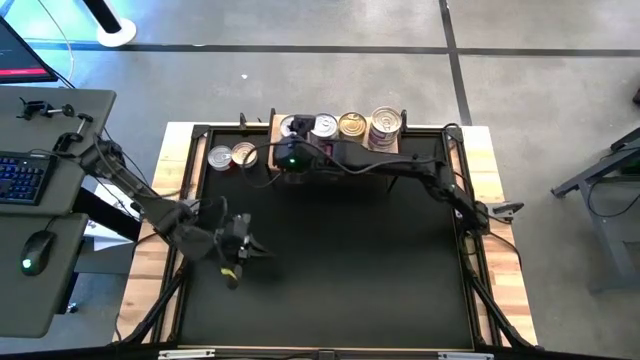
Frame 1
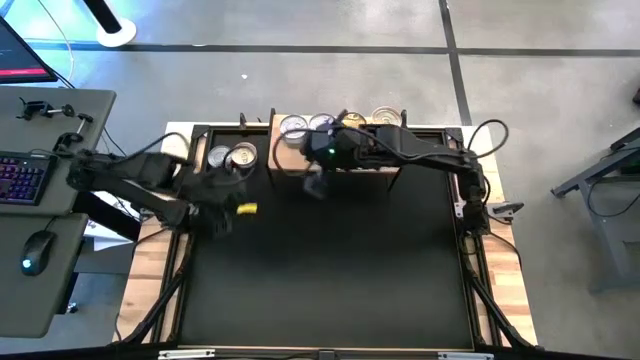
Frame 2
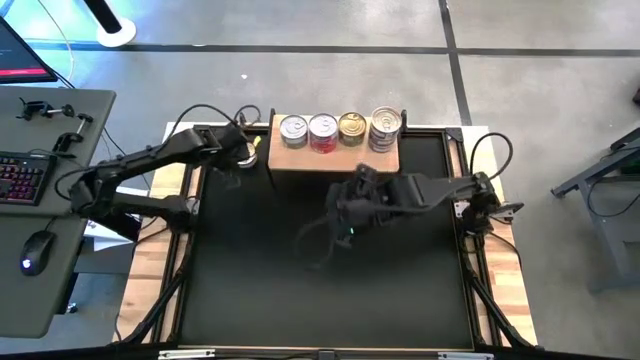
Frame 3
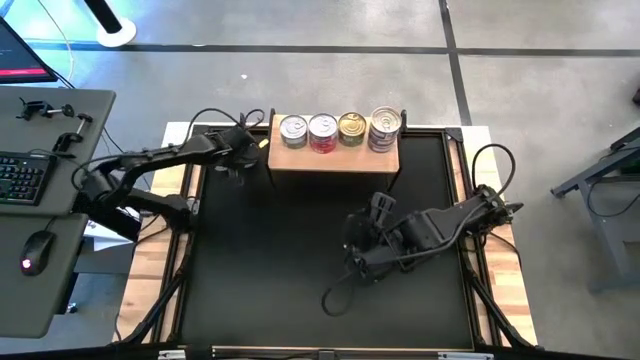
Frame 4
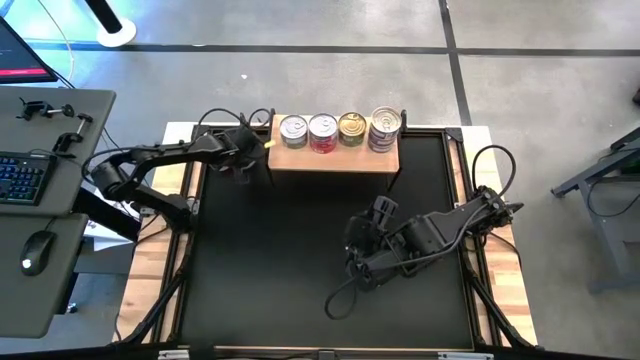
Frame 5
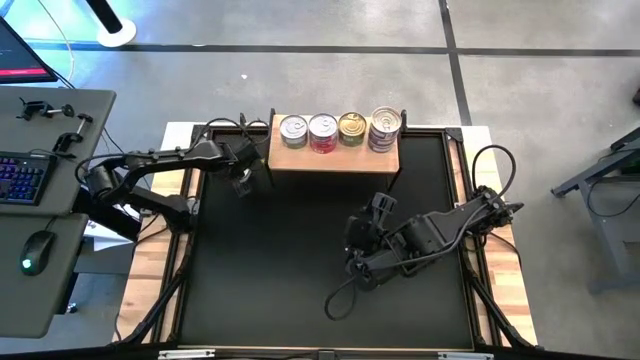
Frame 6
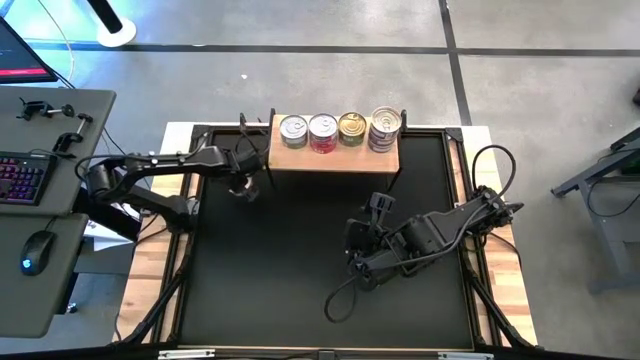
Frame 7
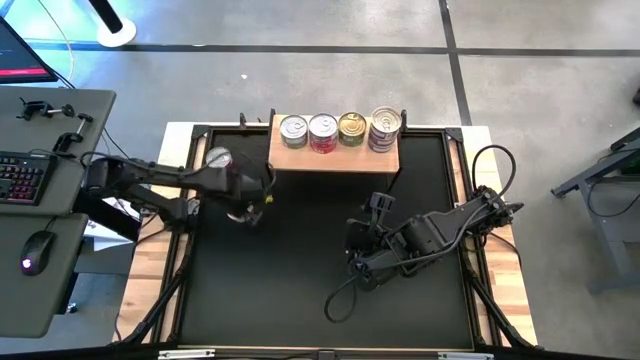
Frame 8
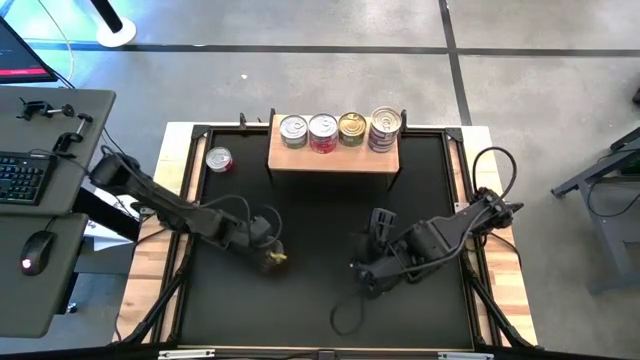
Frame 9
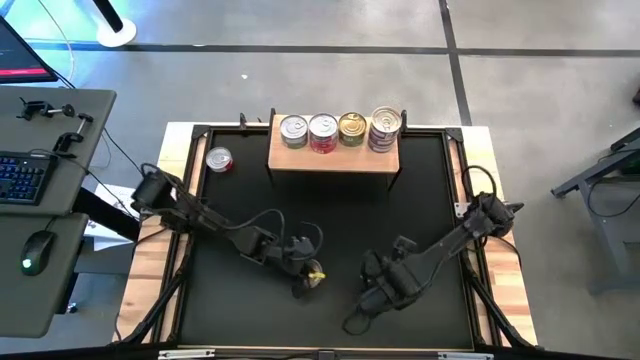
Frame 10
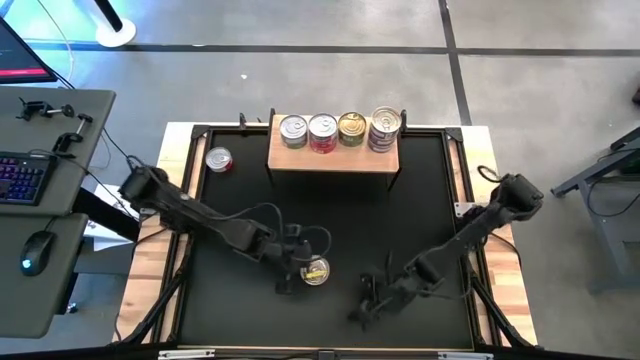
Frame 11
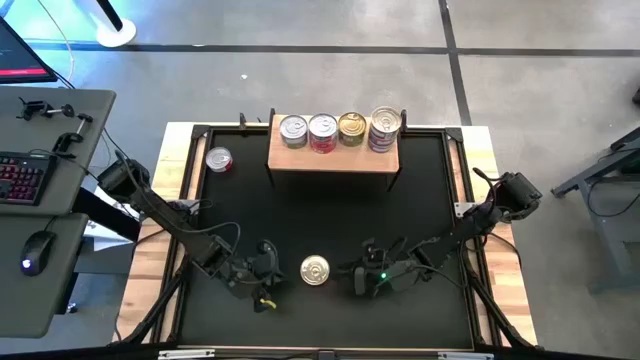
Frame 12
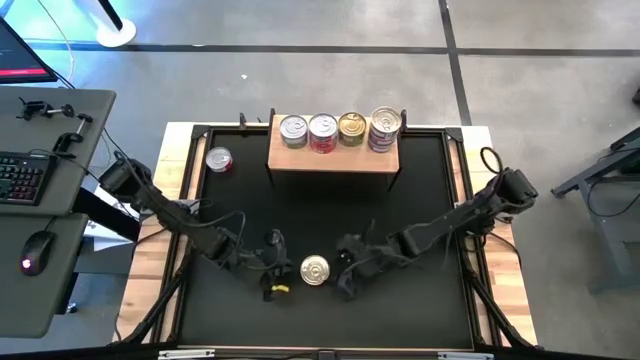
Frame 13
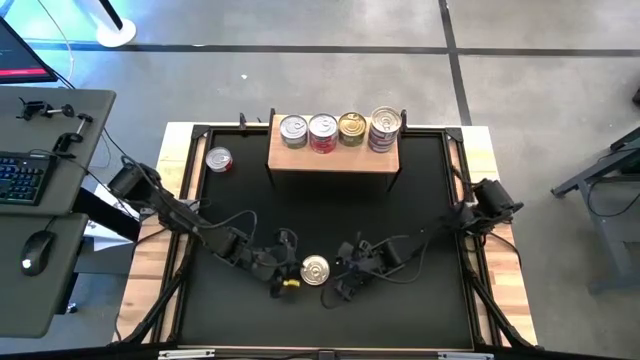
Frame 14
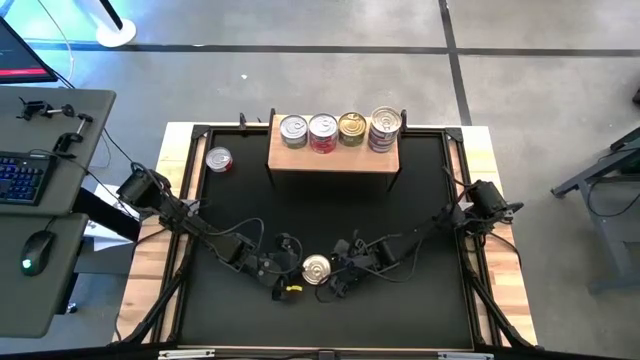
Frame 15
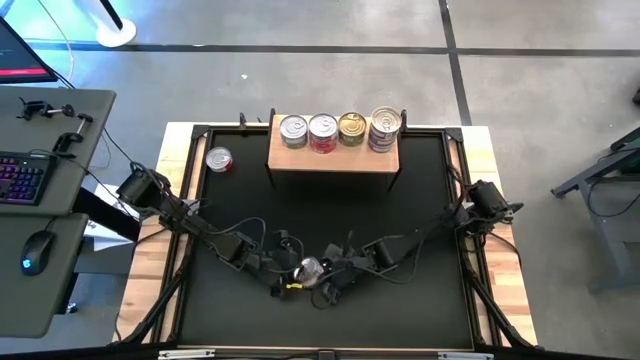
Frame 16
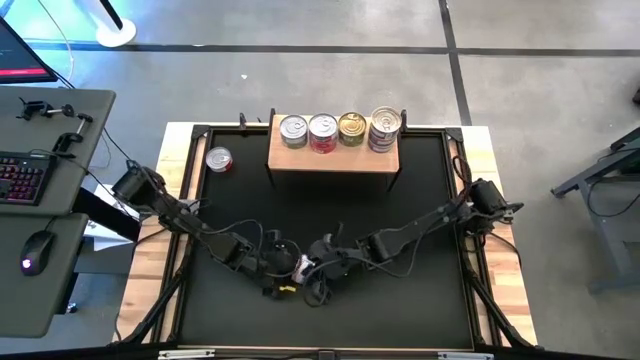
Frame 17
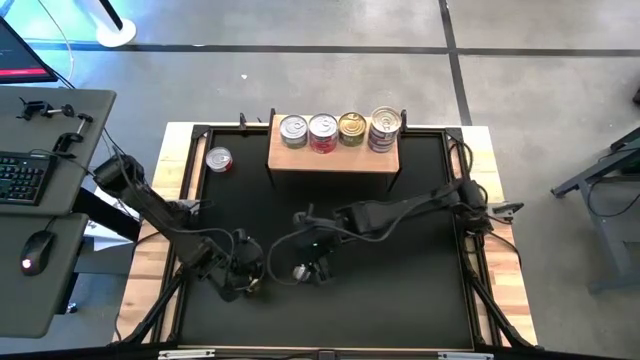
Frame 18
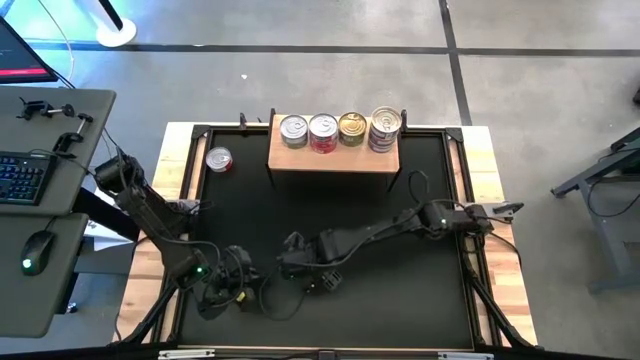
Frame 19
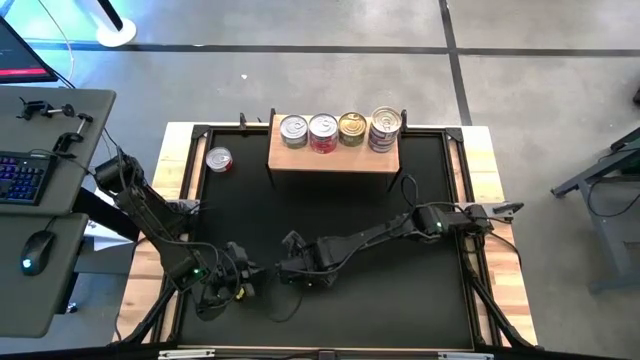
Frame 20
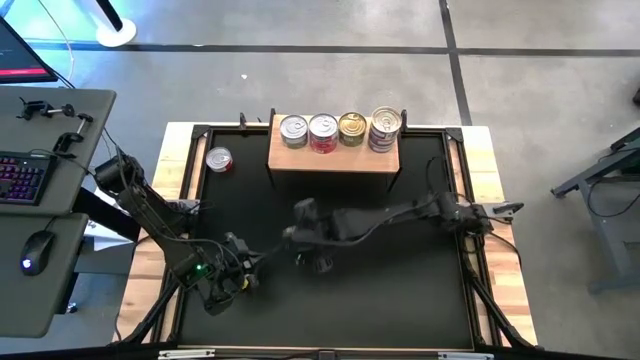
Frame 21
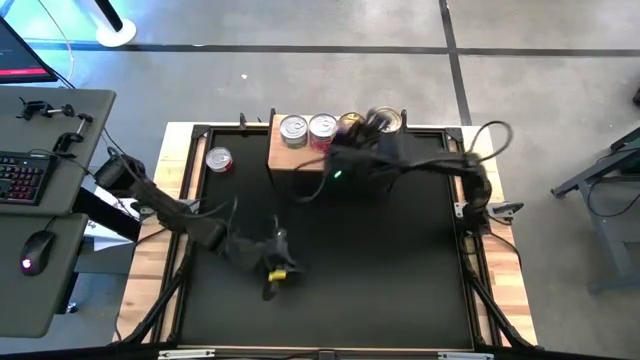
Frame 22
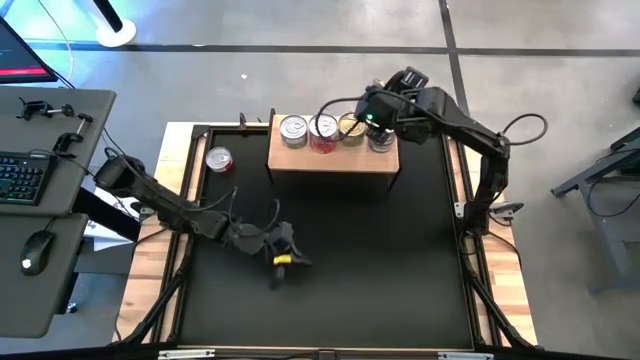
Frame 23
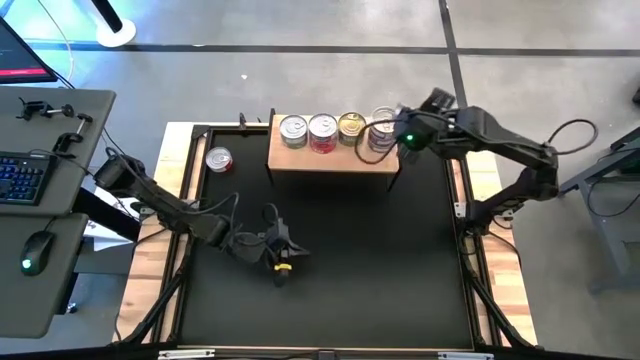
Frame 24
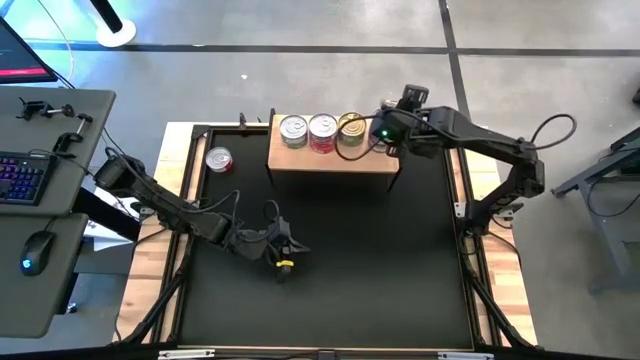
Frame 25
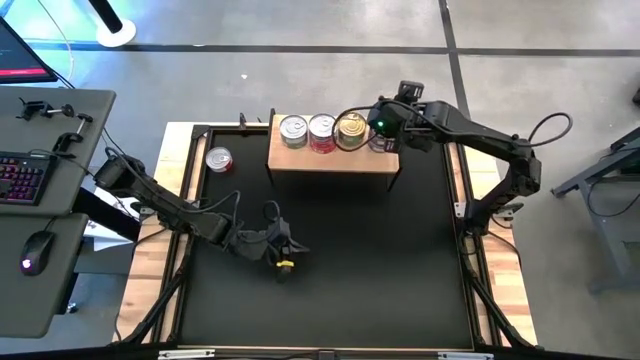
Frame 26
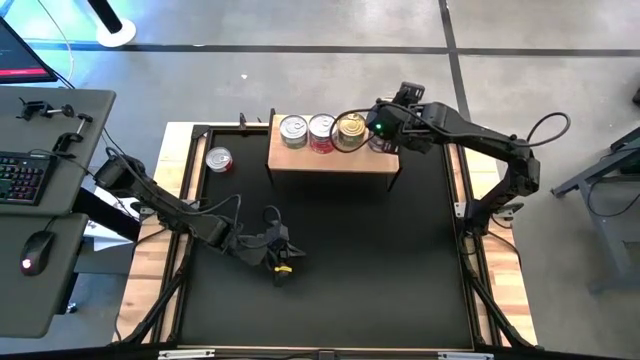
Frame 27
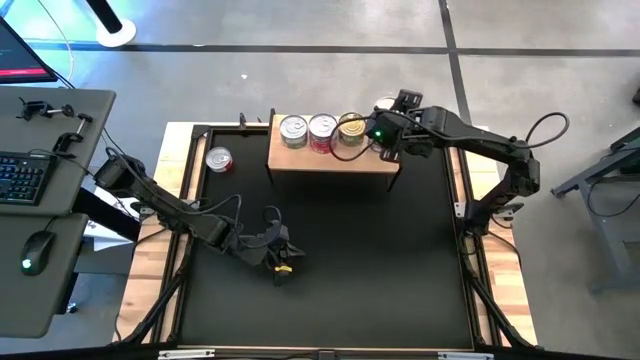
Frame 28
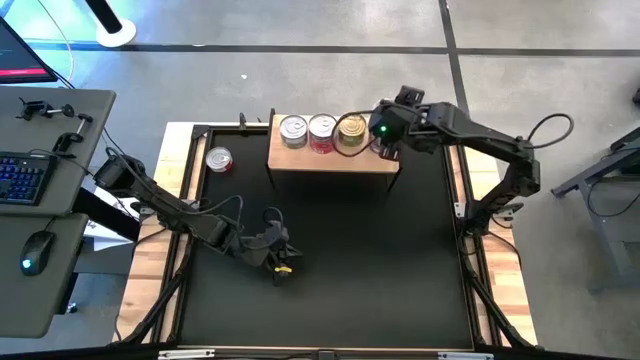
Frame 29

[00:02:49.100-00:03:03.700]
Task: Stack canned seafood by type on shelf
Stack the blue tuna can on top of the other blue tuna cans

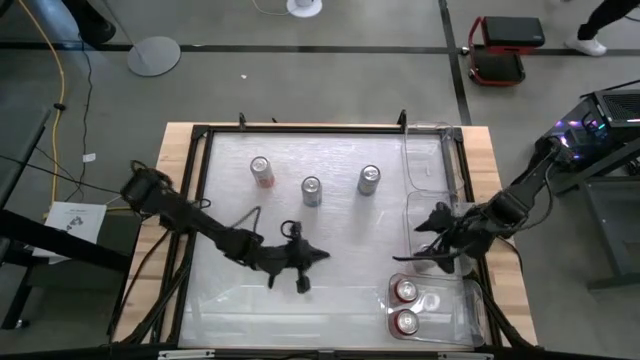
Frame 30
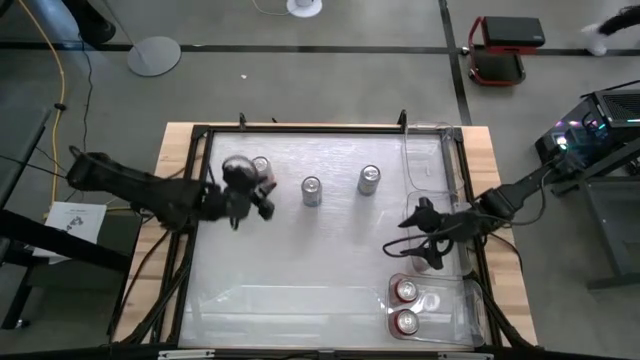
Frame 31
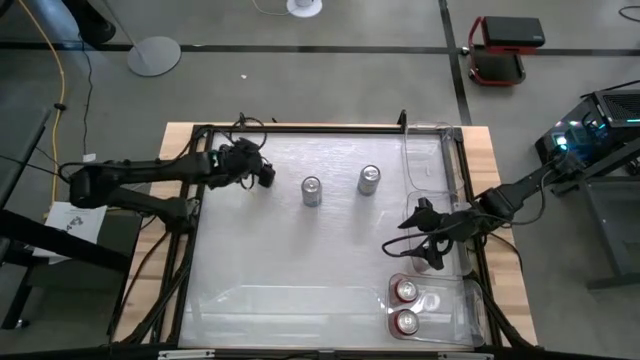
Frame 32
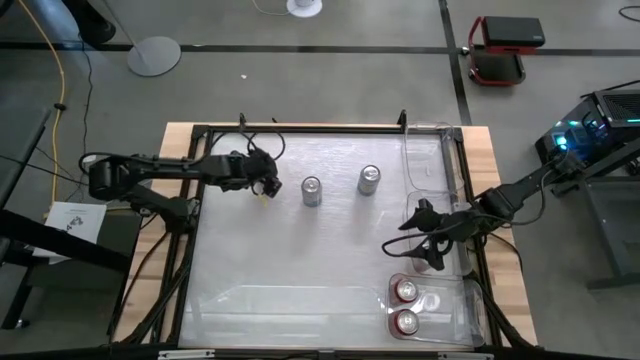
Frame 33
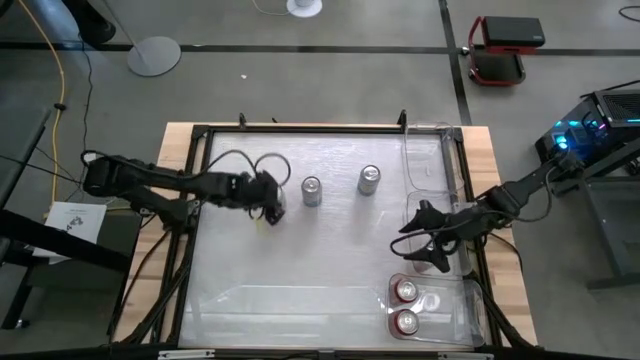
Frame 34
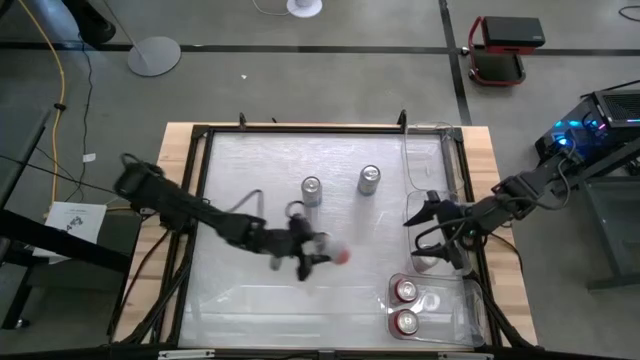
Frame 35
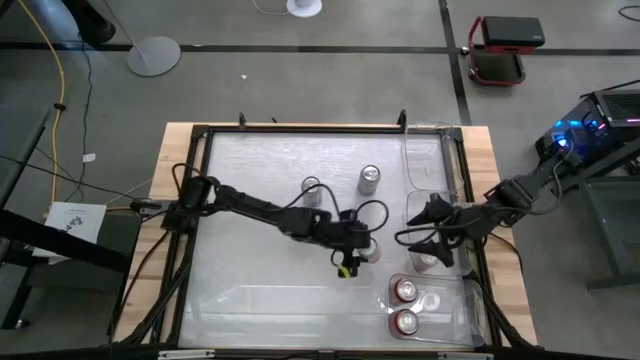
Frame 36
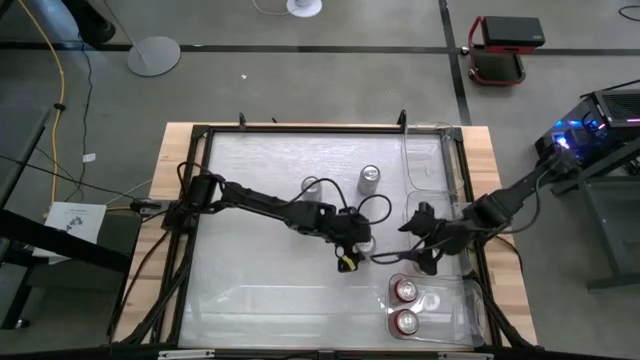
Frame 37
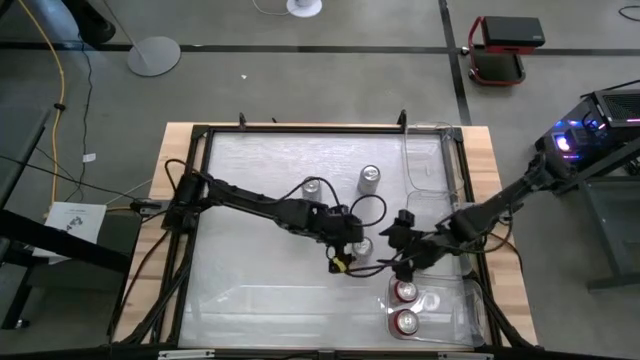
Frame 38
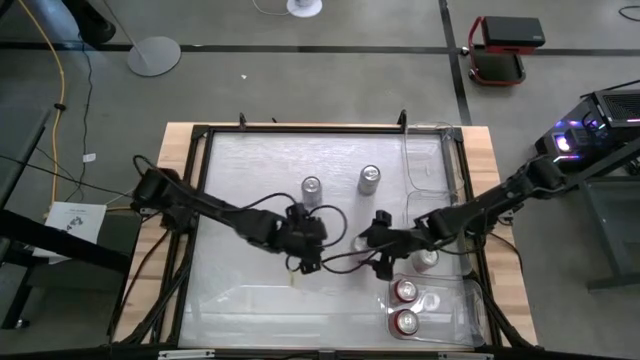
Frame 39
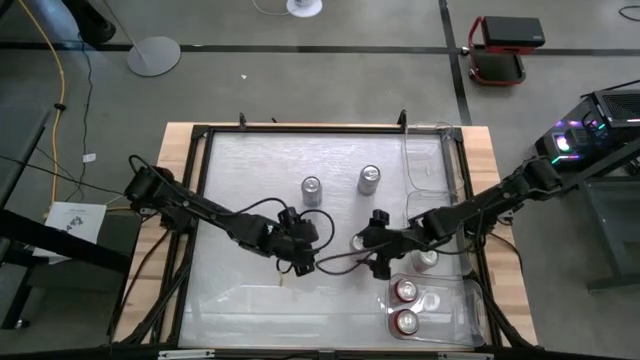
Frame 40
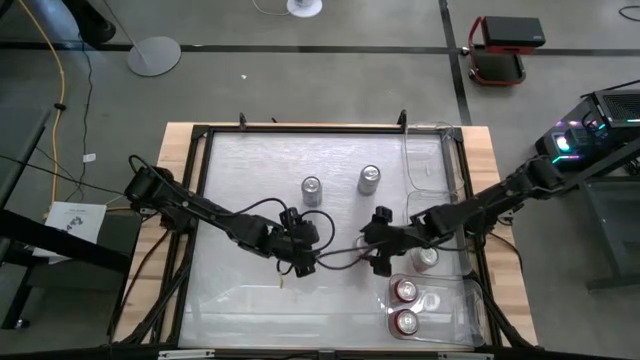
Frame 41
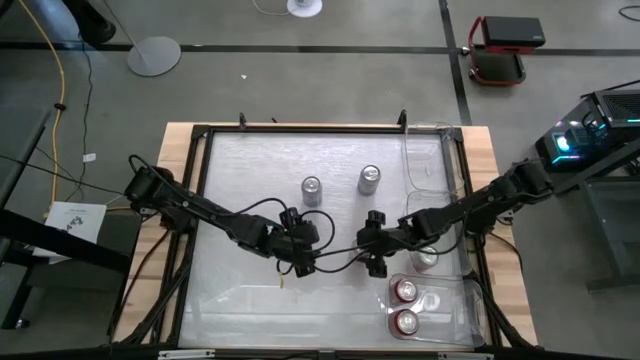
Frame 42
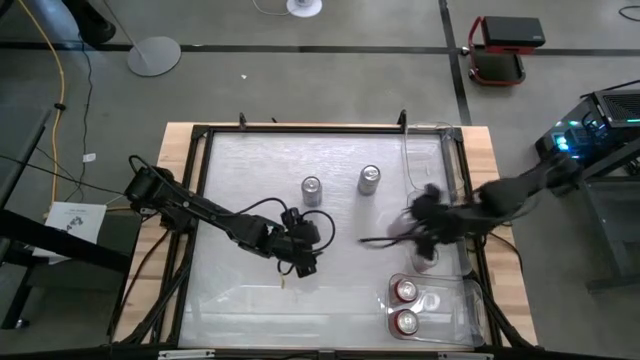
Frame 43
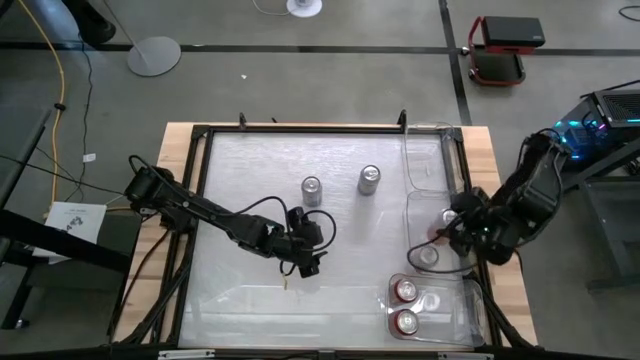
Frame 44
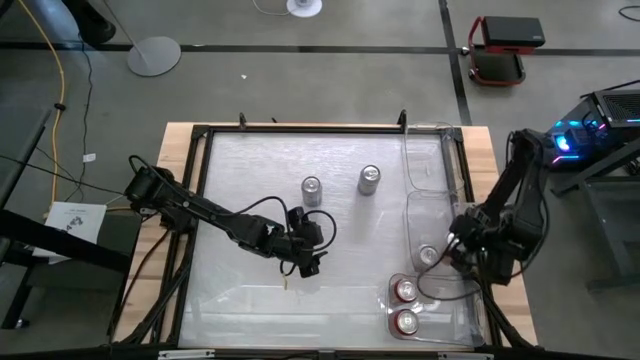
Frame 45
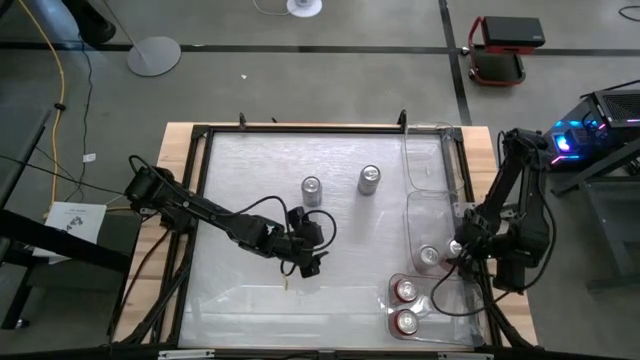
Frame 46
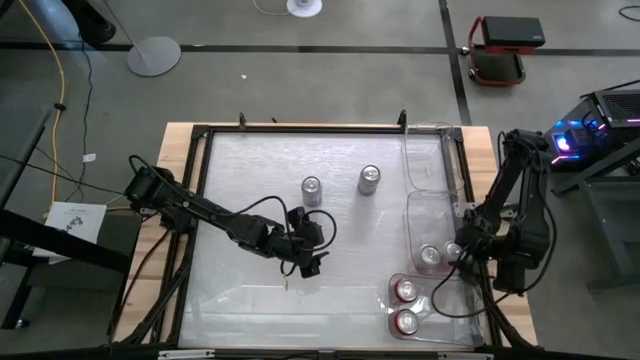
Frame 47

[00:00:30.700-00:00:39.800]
Task: Sort soda cans
Put the orange-white soda can into the center transparent bin
